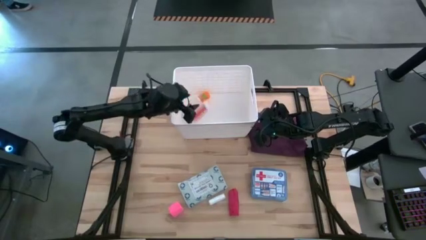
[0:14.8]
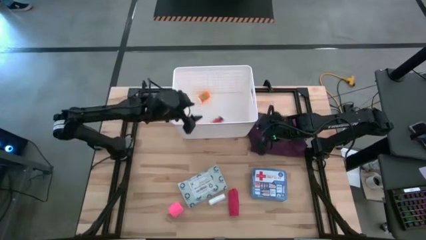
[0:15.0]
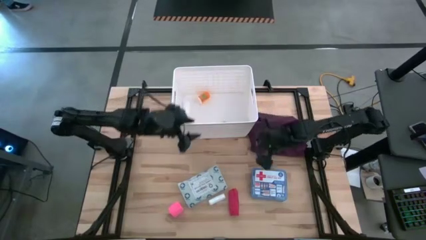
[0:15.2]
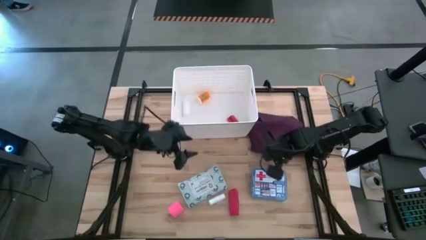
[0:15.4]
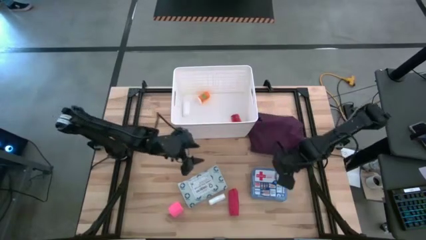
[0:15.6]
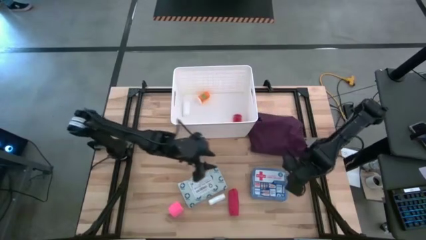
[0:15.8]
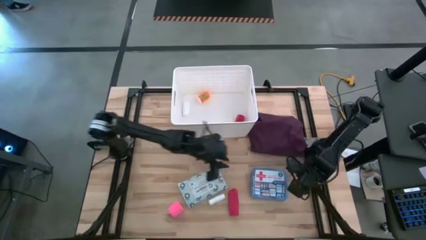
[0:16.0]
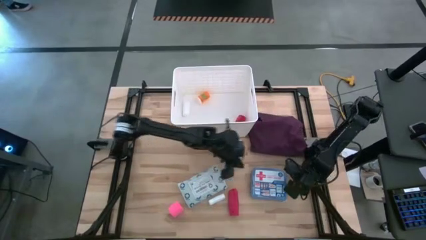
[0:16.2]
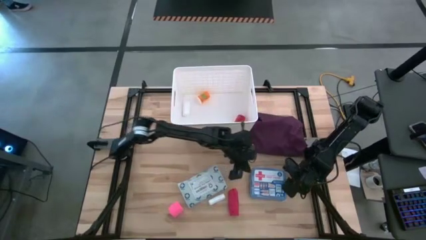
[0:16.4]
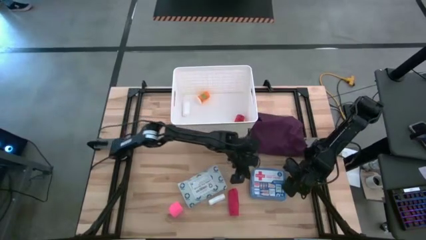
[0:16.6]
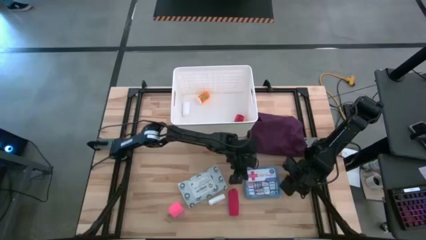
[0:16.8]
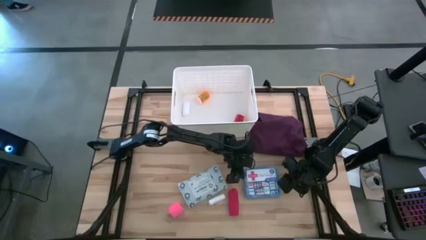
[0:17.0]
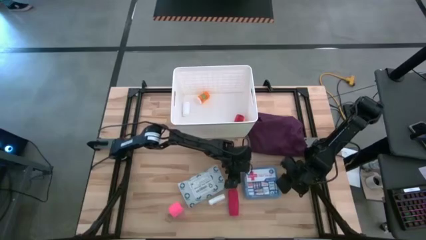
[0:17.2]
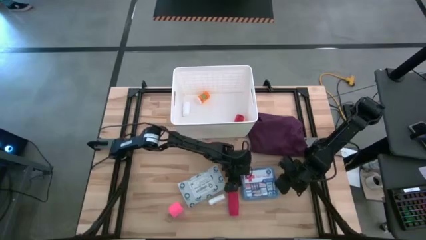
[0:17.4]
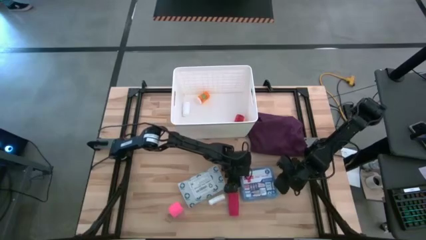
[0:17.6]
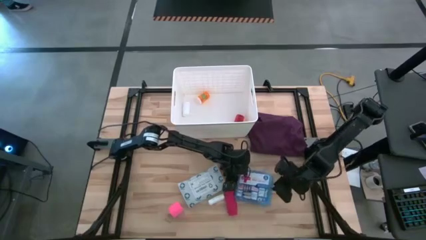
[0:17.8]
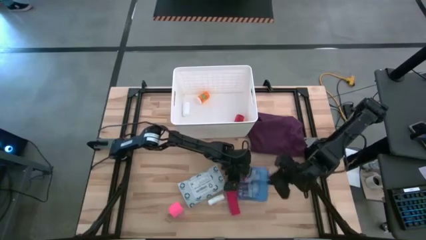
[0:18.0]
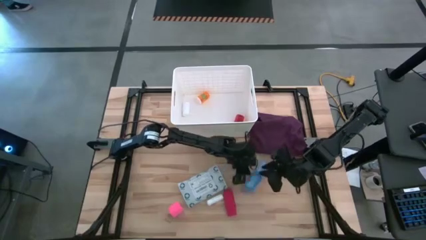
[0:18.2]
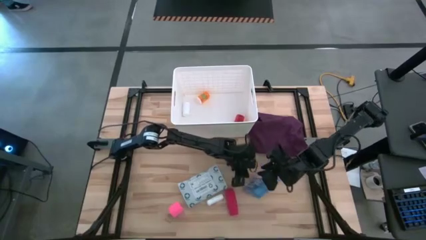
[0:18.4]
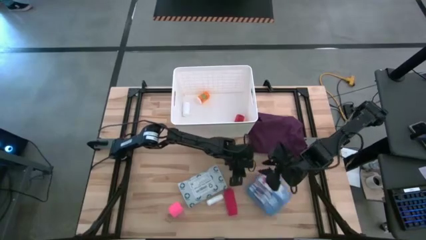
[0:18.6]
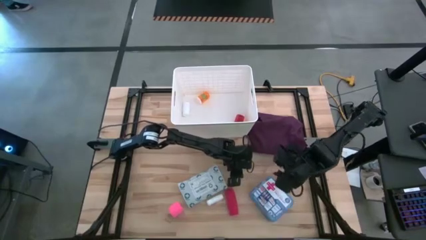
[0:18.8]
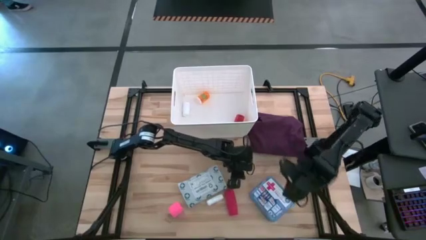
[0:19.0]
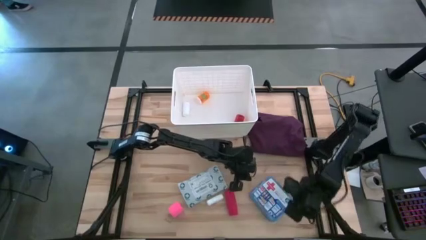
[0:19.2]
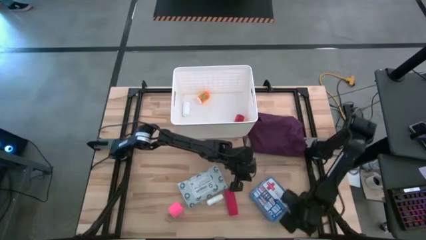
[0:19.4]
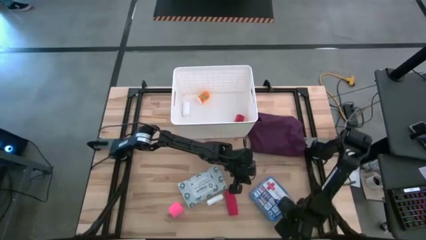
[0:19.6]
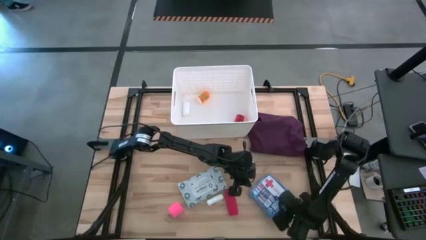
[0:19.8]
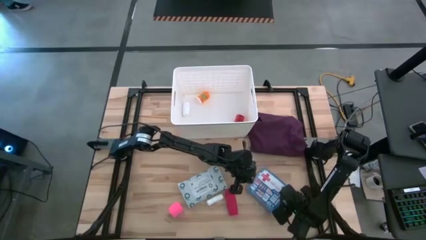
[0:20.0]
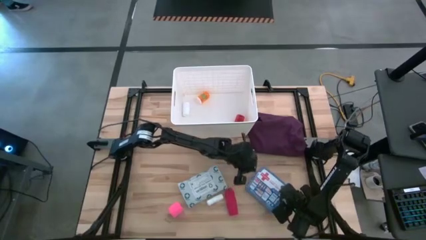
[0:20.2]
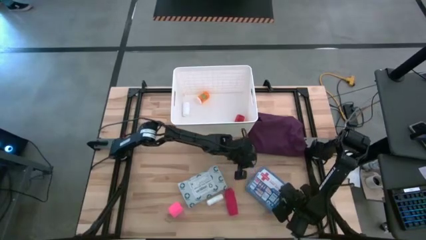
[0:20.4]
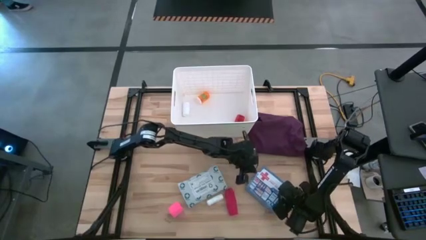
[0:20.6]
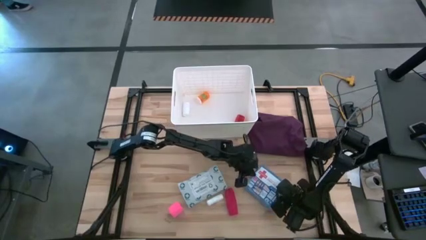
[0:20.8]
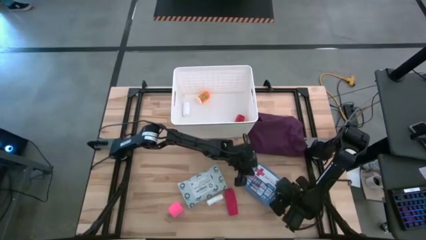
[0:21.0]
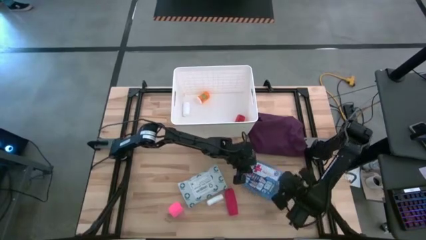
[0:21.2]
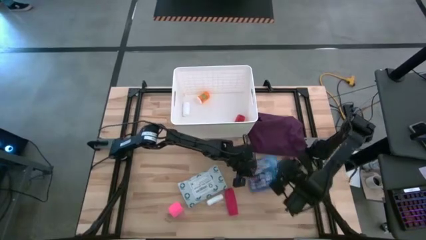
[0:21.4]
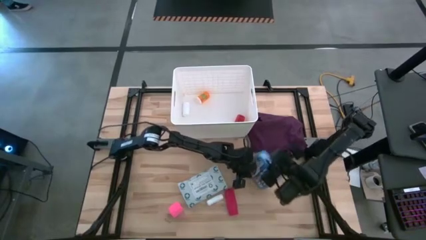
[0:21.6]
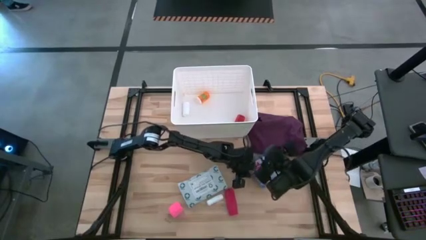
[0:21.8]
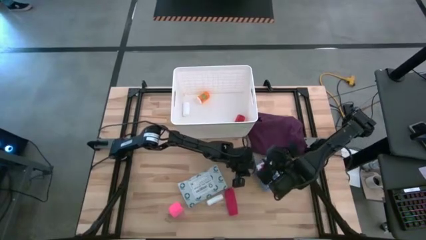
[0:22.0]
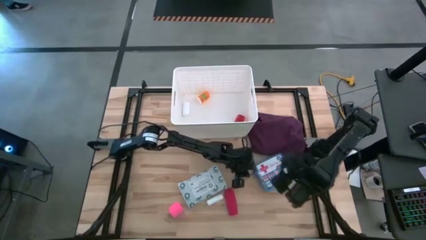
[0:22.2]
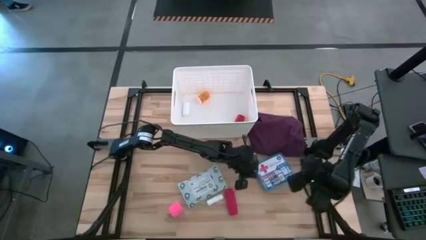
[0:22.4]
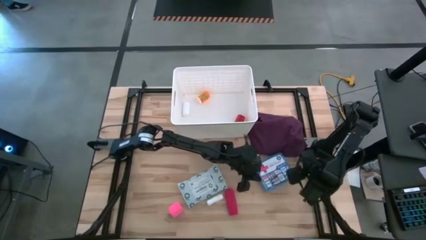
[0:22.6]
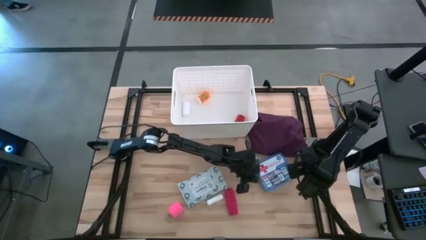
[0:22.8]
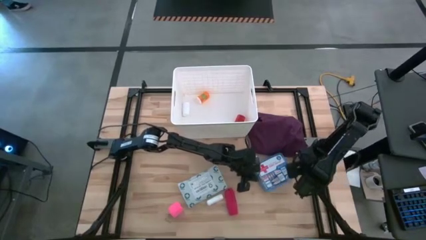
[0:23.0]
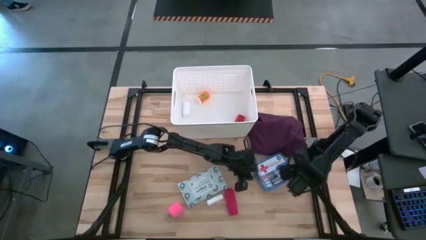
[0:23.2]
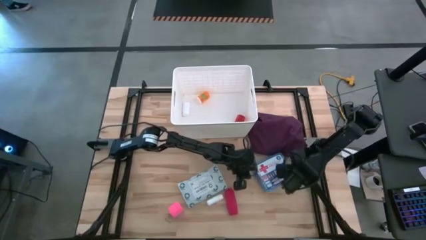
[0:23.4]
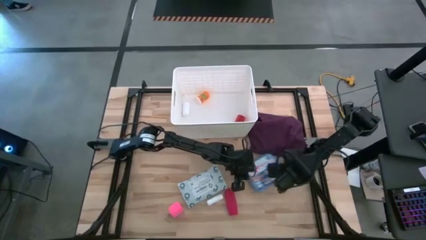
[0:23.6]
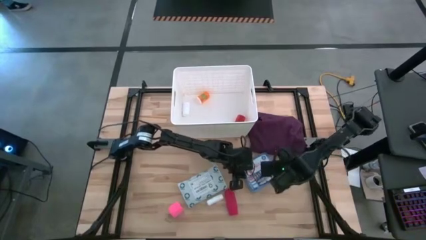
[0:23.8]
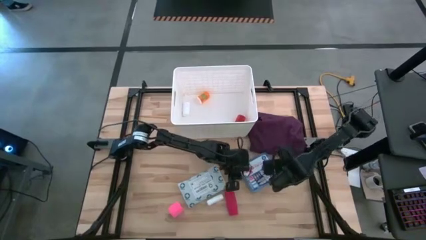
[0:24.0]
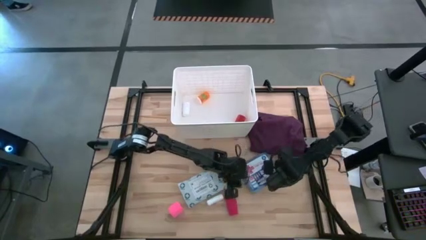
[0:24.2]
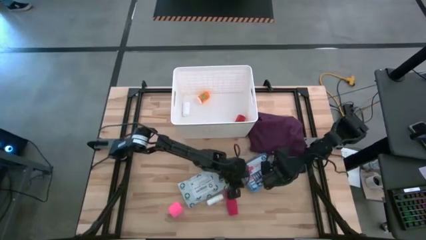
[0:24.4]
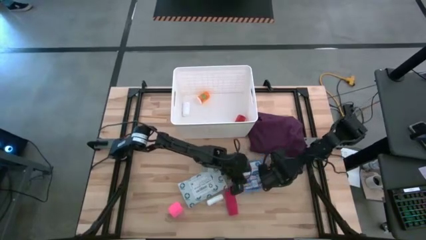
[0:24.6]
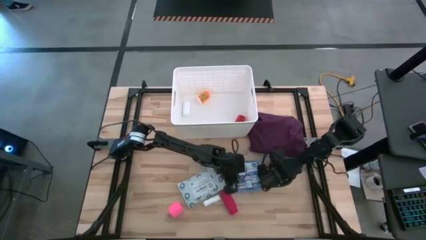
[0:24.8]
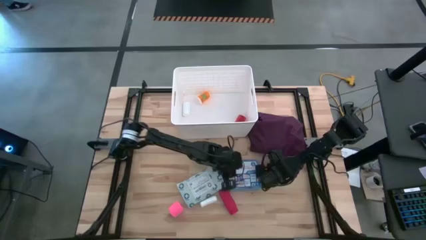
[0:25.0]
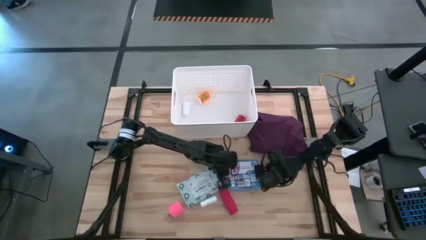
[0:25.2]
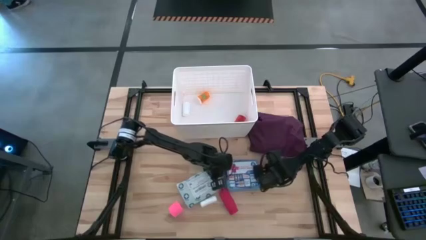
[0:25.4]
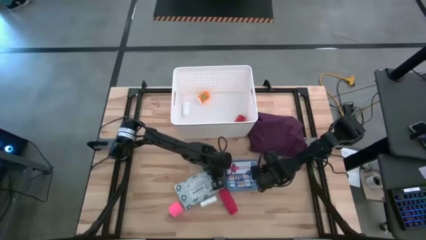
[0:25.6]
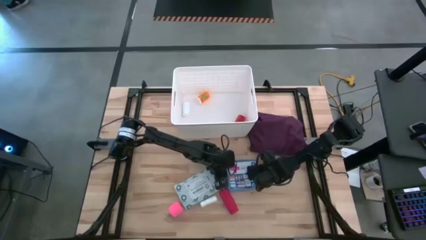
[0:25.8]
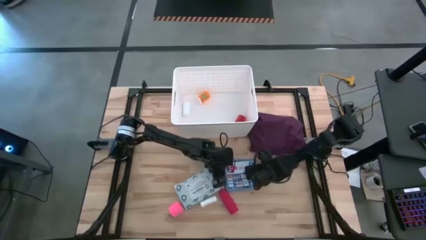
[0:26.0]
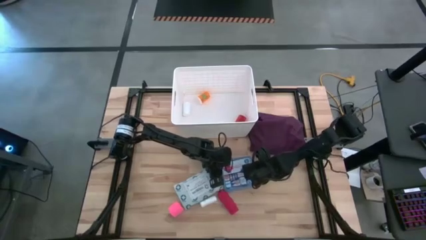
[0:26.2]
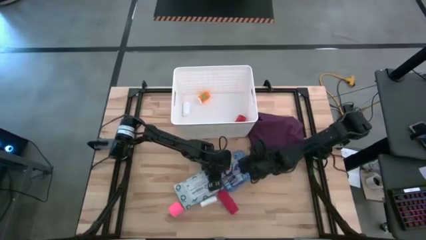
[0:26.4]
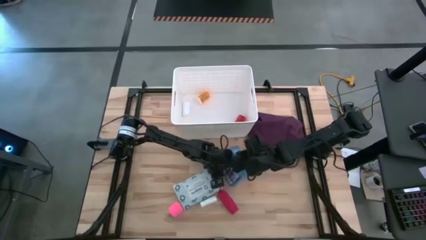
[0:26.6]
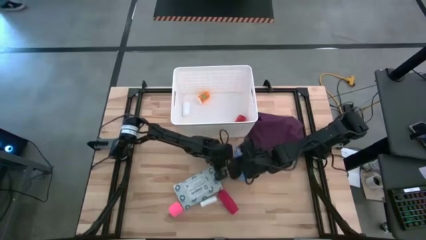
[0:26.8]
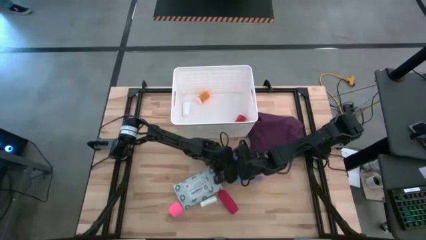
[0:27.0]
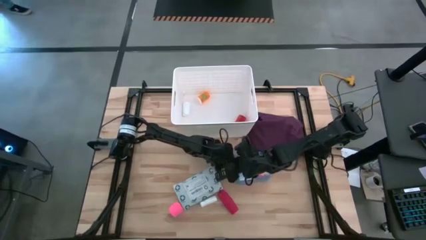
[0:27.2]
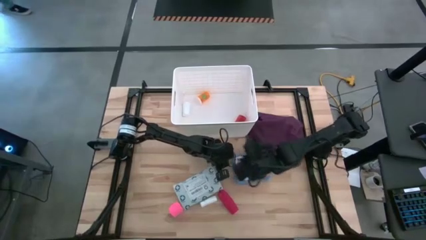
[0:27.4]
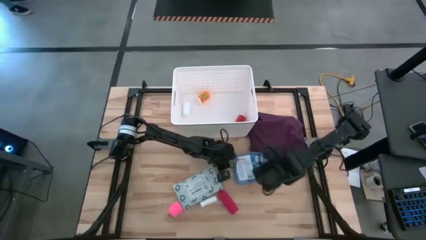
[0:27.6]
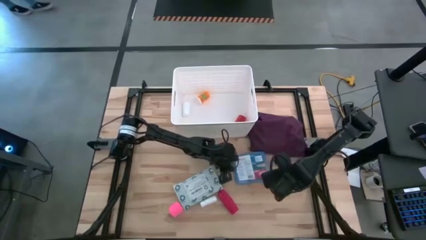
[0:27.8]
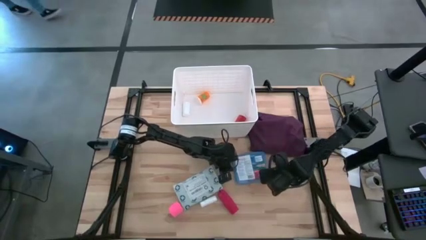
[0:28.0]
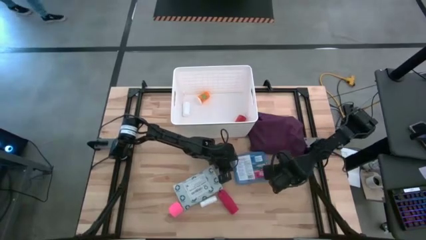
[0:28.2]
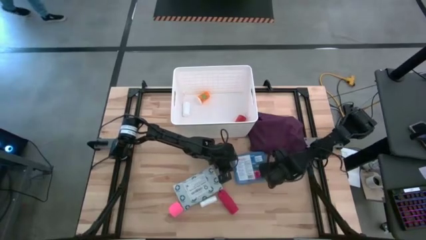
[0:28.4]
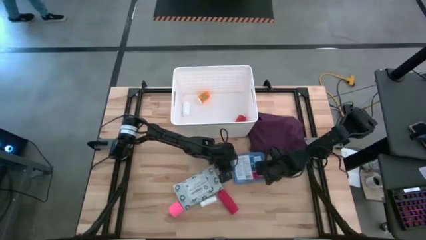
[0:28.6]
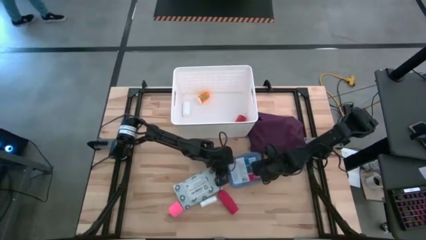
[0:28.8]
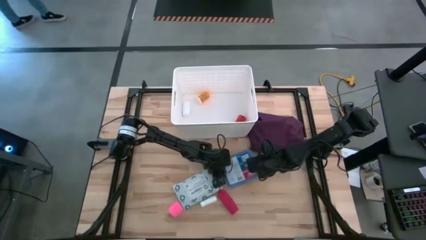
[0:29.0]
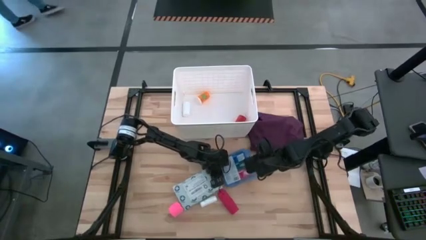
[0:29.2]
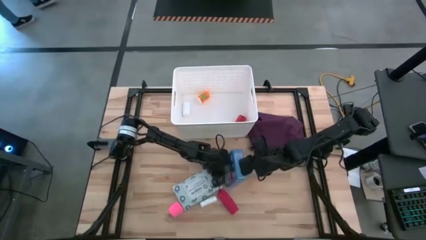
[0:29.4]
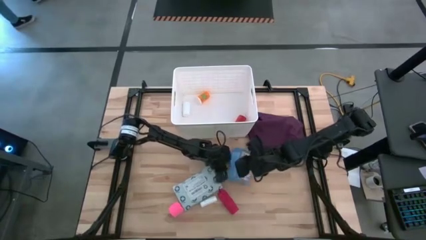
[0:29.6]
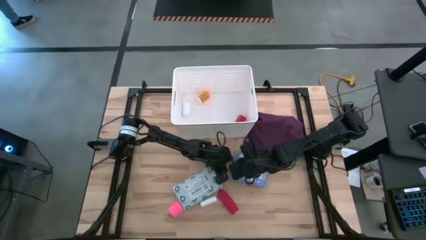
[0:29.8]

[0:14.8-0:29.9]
Task: Pick & place medical supplies in basket/bin
Put the blue first aid kit into the white bin
